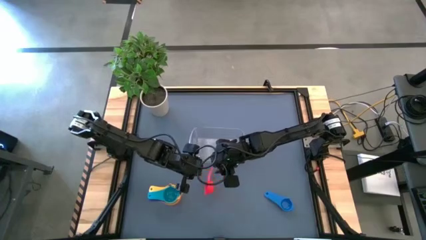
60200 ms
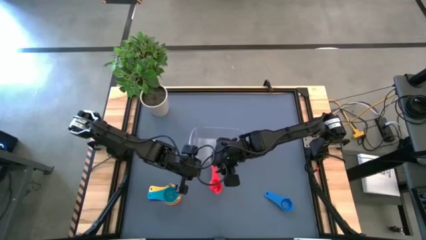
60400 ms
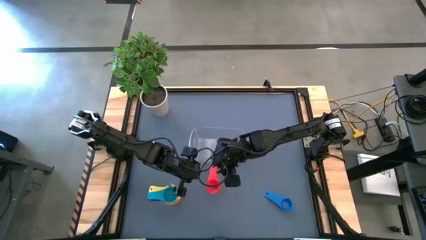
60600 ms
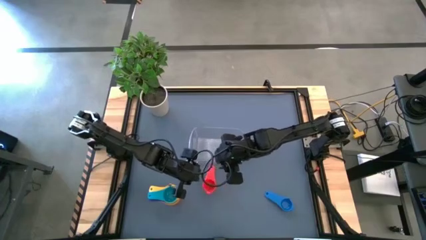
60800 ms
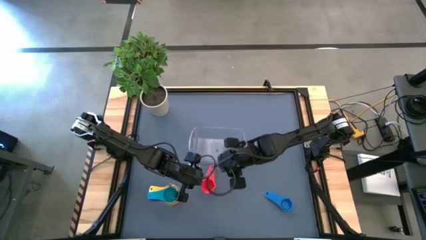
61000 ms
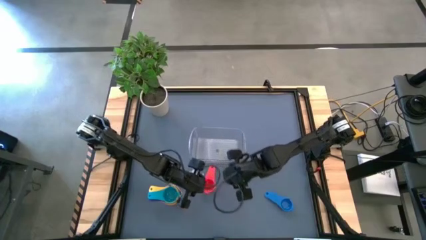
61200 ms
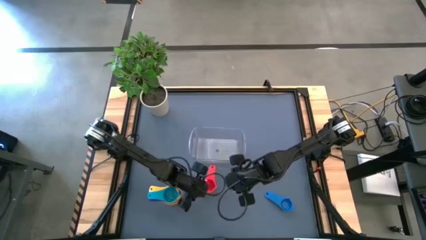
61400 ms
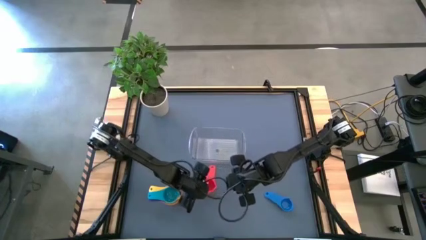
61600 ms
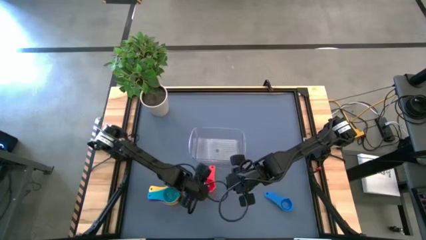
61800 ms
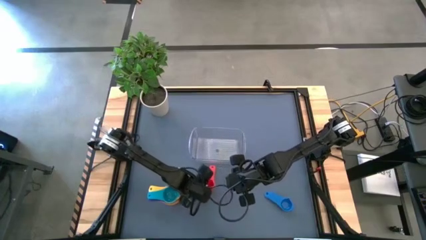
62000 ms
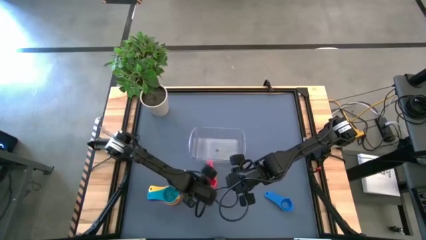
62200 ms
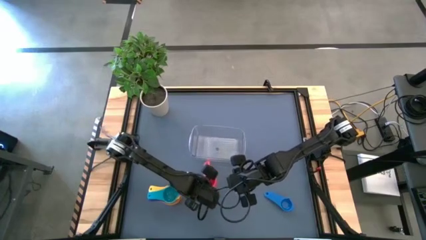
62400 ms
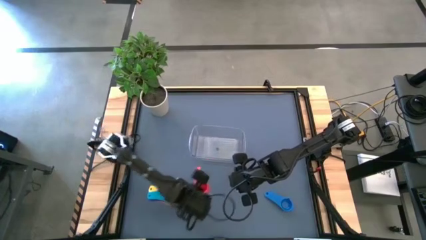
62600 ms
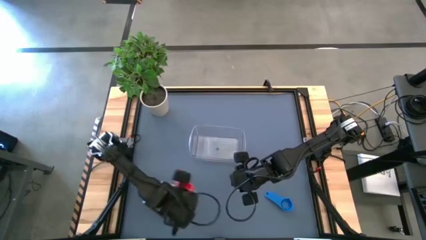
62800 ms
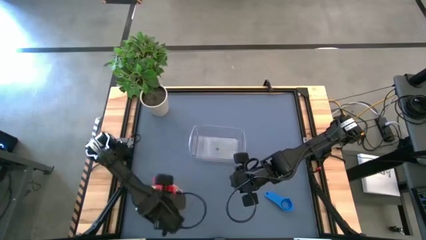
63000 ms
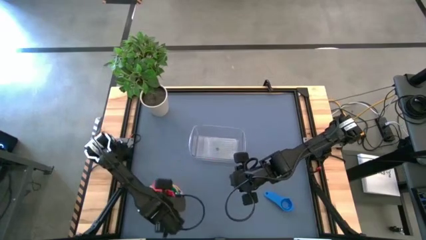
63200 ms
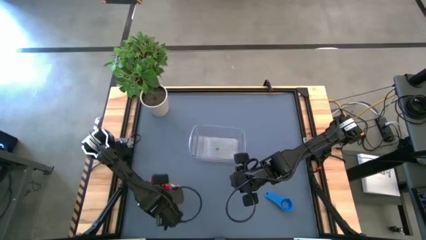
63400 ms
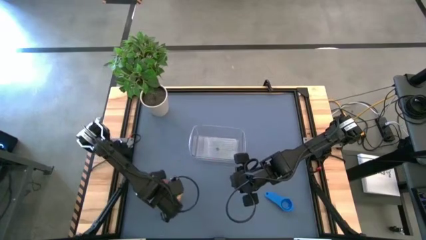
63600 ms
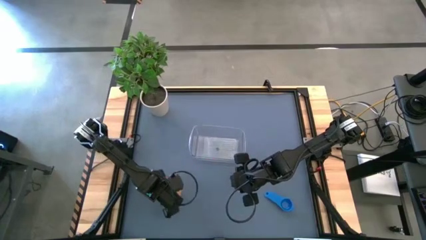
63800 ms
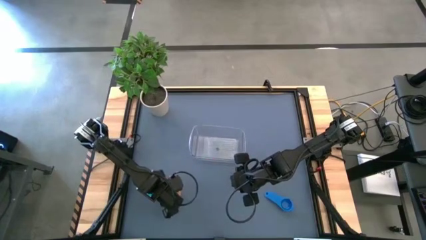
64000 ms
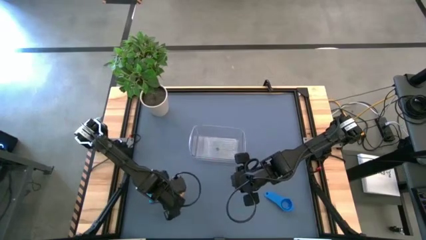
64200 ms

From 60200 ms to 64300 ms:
Task: Nest measuring cups in basket
Stack the red measuring cup on top of the light blue measuring cup

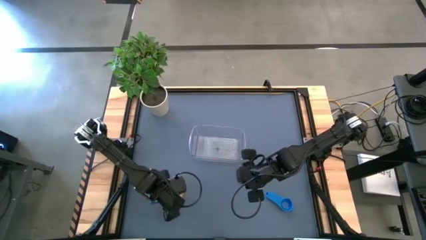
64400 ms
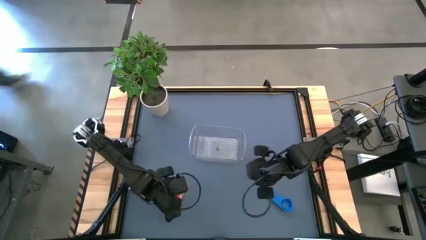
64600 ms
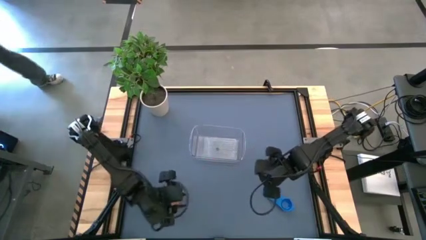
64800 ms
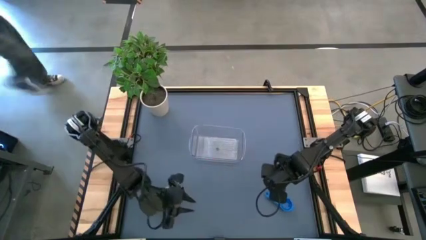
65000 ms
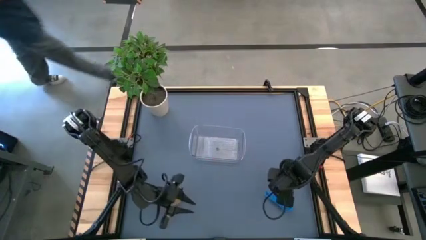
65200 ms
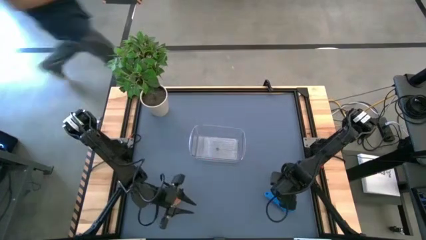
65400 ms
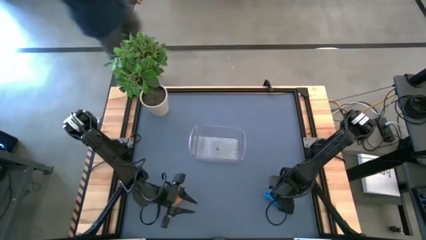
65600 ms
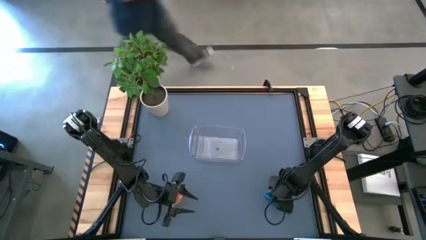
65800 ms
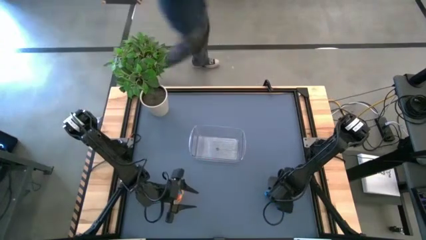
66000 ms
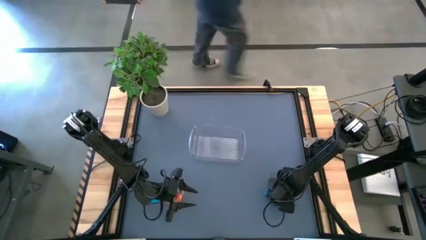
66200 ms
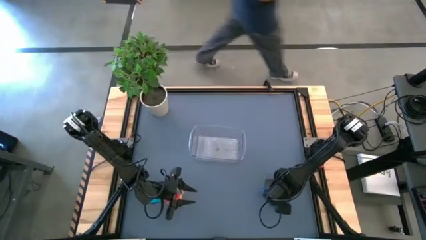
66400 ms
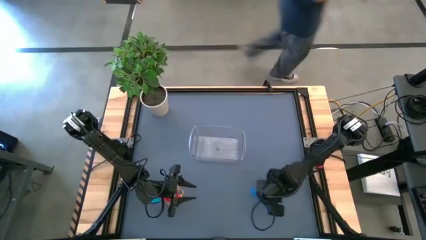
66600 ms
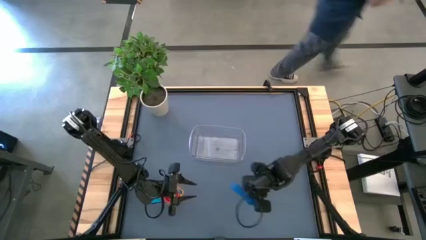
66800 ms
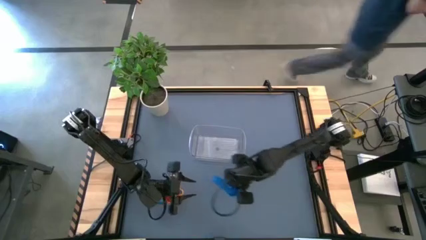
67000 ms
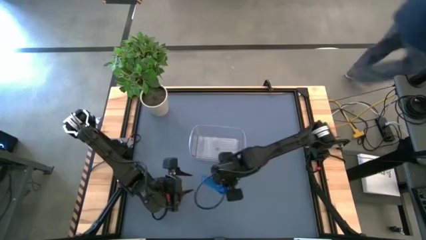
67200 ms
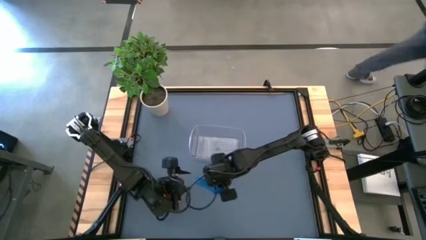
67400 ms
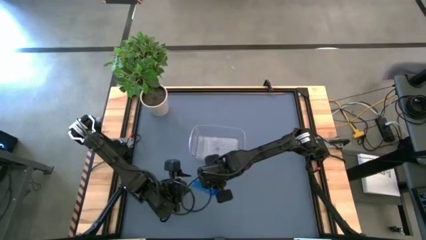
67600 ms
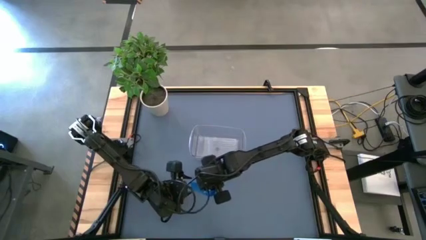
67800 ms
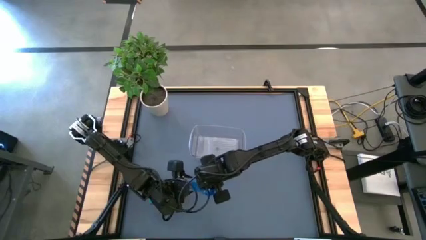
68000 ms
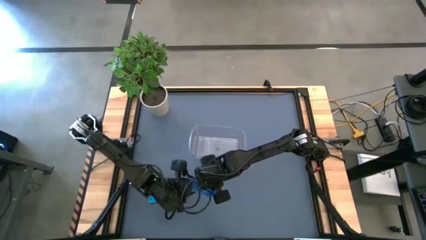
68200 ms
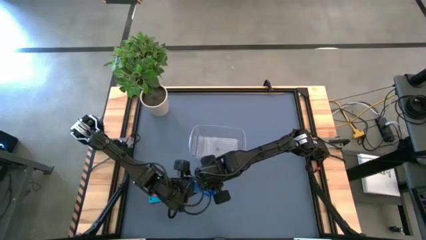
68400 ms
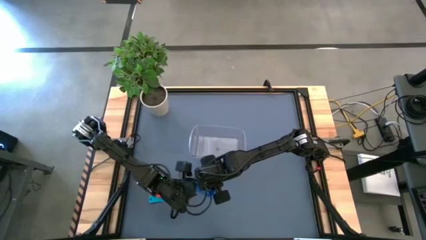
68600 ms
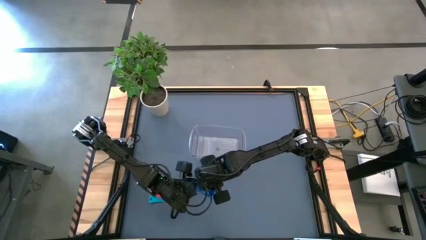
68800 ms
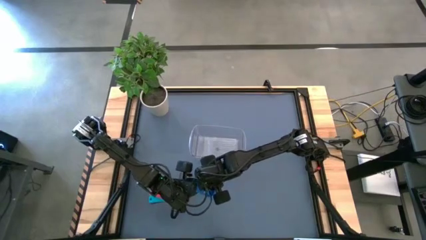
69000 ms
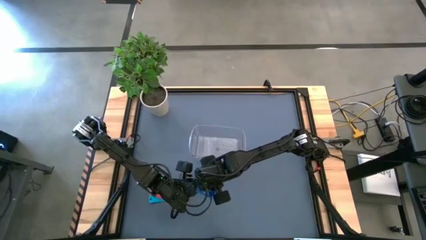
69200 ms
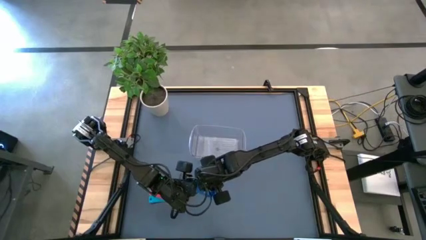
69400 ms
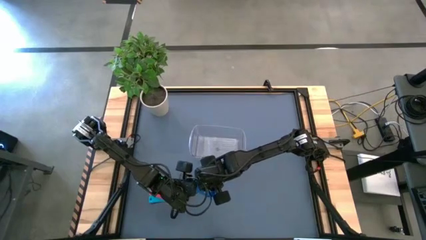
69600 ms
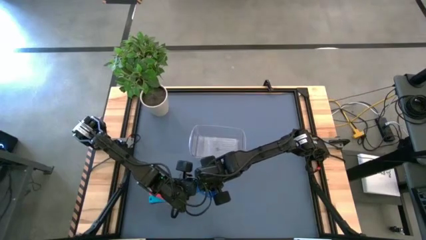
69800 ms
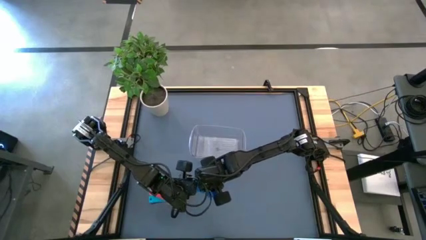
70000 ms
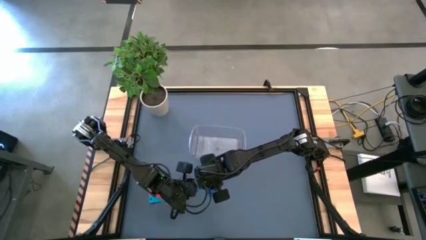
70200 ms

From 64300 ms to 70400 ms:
Stack the dark blue measuring cup on top of the red measuring cup

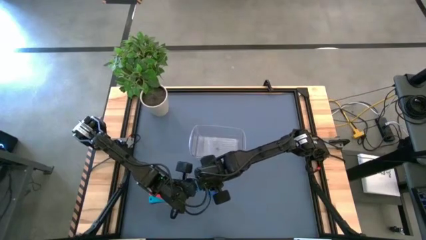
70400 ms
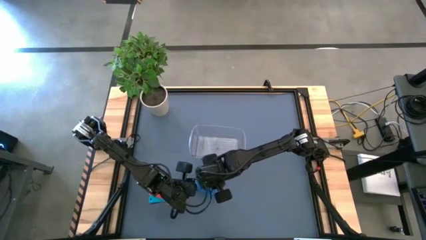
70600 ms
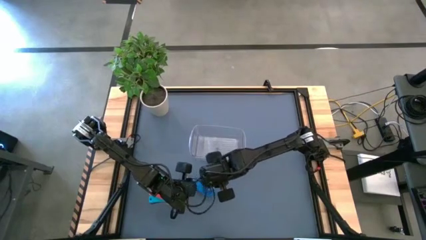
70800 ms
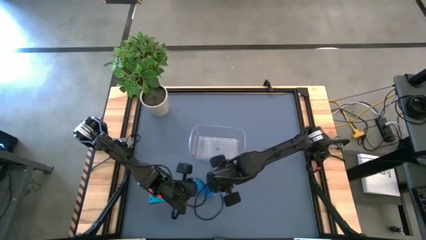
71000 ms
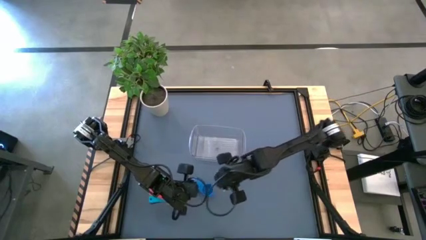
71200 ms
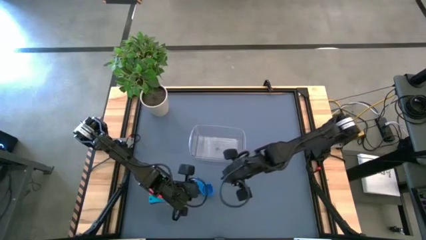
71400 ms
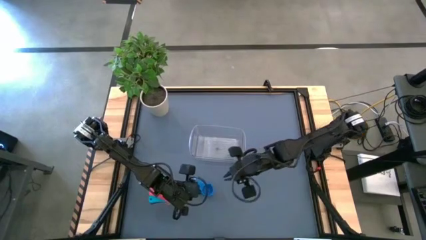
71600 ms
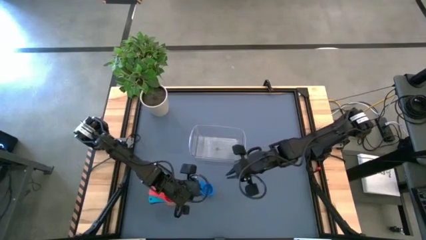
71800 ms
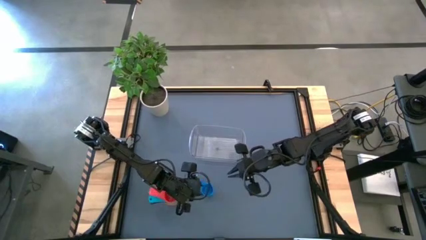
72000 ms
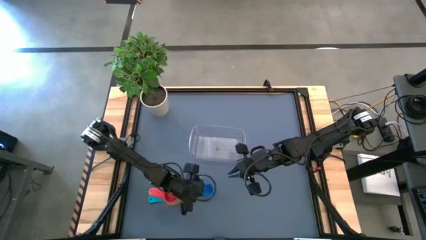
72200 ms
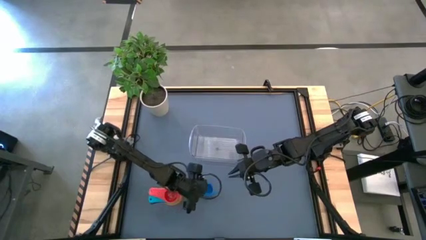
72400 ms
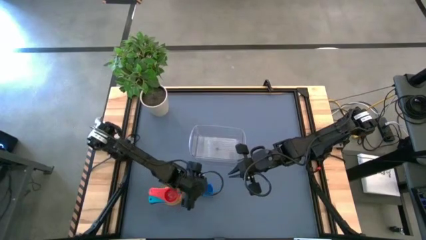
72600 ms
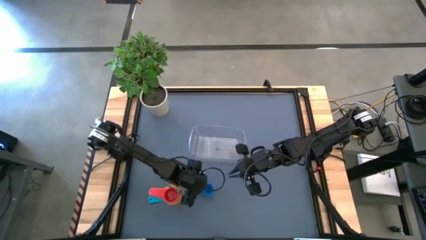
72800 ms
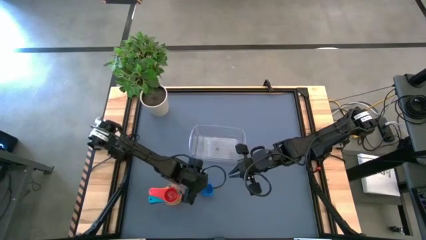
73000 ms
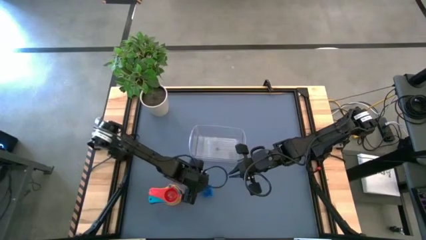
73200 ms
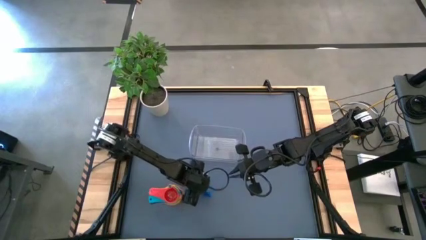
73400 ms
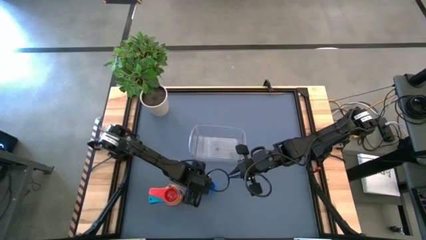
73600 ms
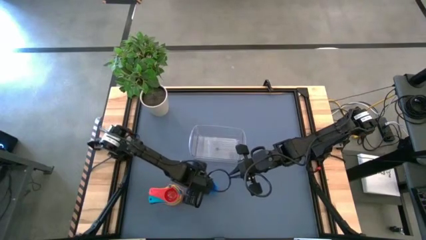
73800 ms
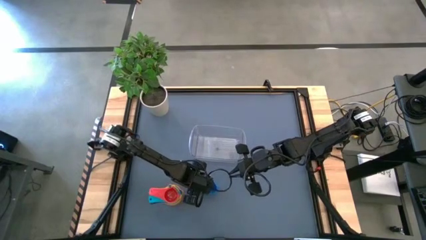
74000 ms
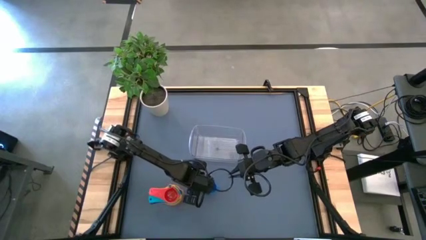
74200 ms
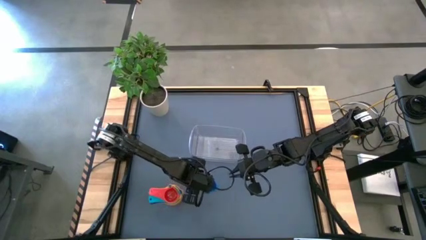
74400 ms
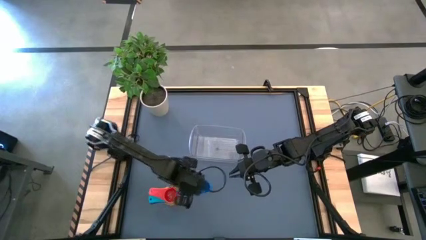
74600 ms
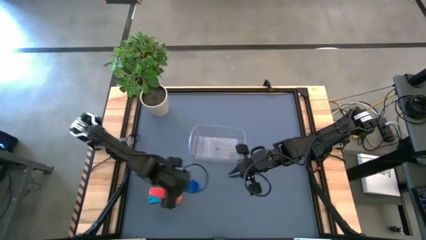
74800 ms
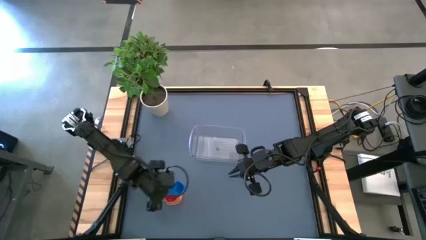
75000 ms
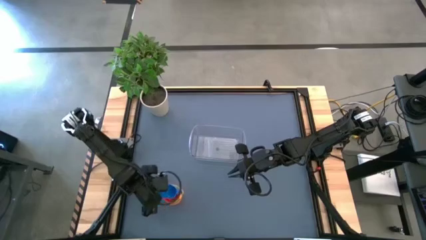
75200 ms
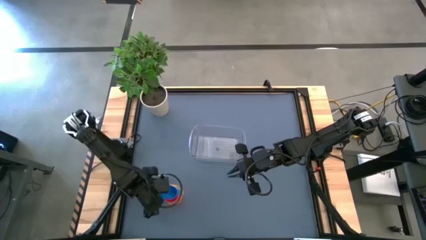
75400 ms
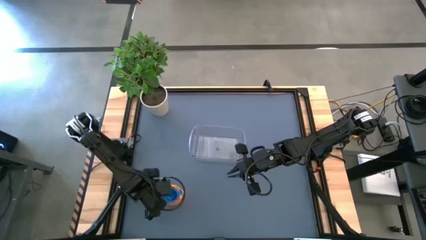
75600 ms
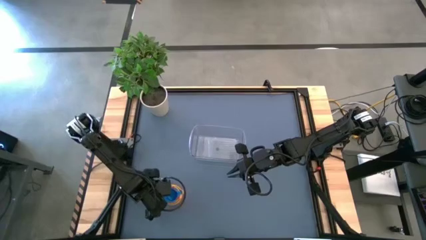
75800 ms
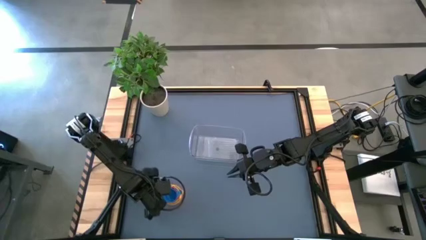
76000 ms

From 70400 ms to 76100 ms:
Stack the dark blue measuring cup into the red measuring cup

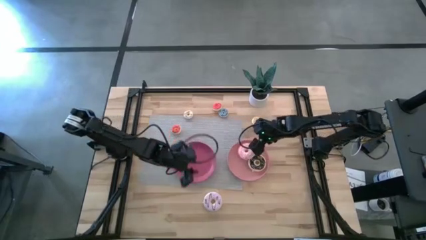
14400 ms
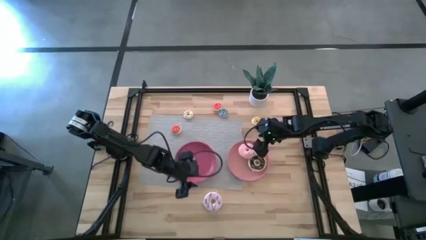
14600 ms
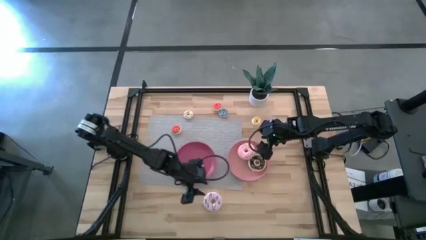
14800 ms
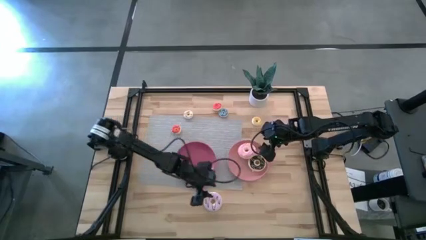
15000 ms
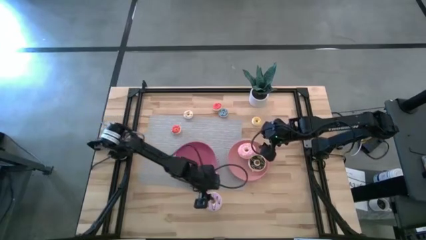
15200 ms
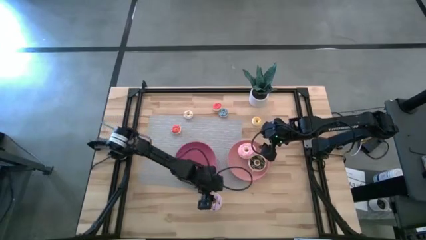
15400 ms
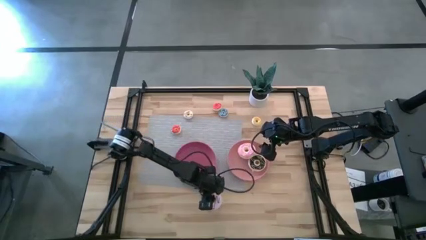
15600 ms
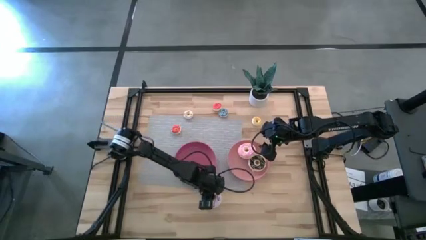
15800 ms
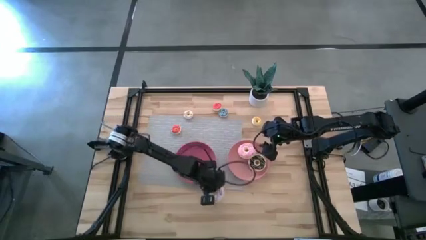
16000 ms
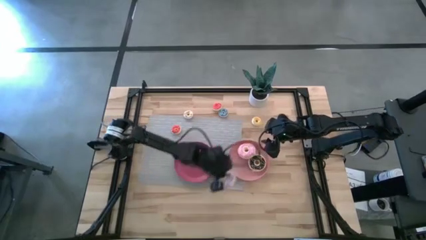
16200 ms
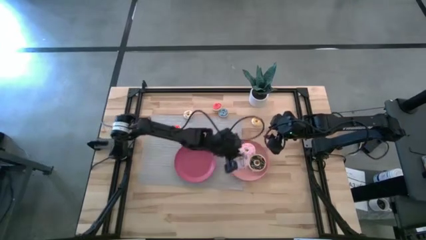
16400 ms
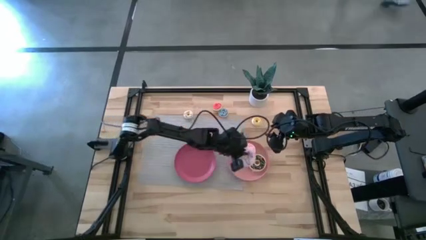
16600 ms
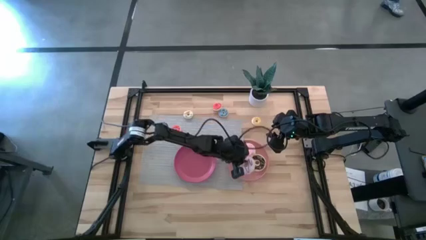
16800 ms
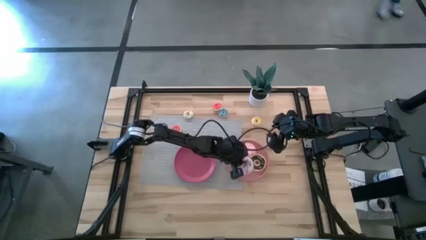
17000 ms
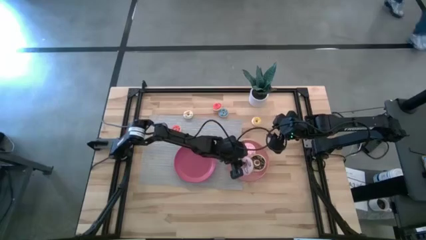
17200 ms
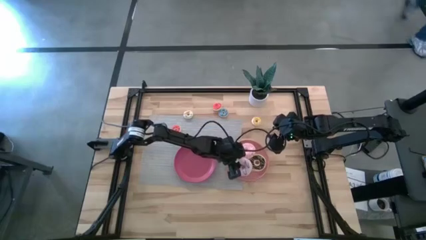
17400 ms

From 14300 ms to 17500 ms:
Task: Pick & Place donuts
Put the large purple donut on the light pink plate
